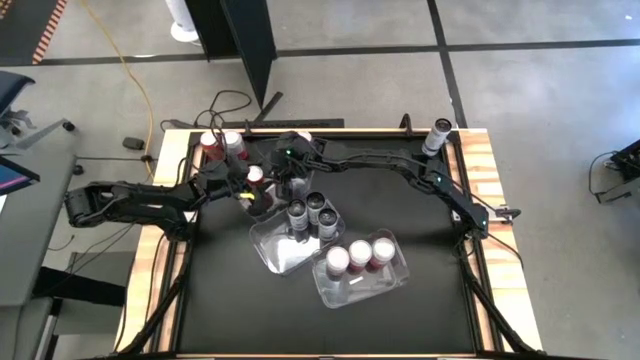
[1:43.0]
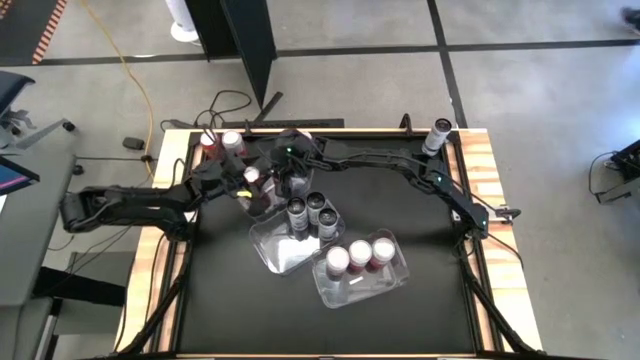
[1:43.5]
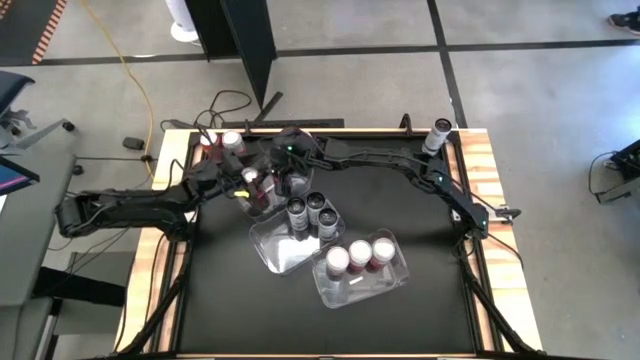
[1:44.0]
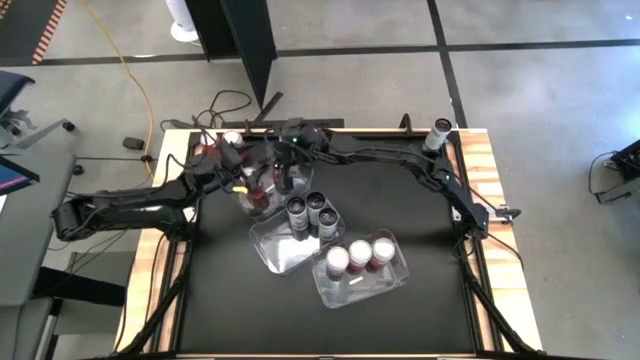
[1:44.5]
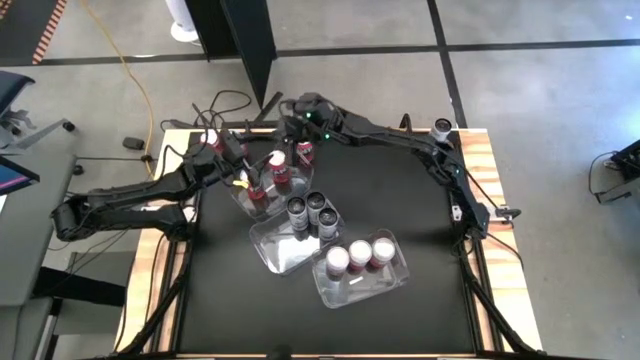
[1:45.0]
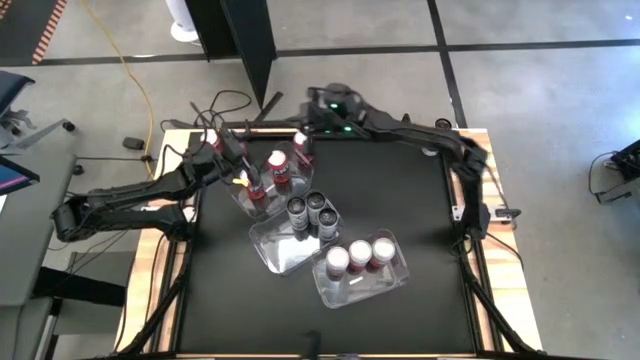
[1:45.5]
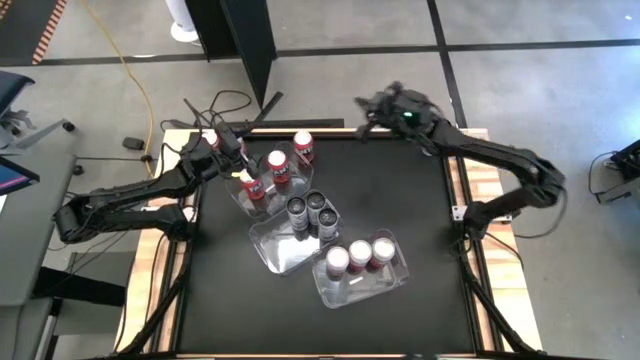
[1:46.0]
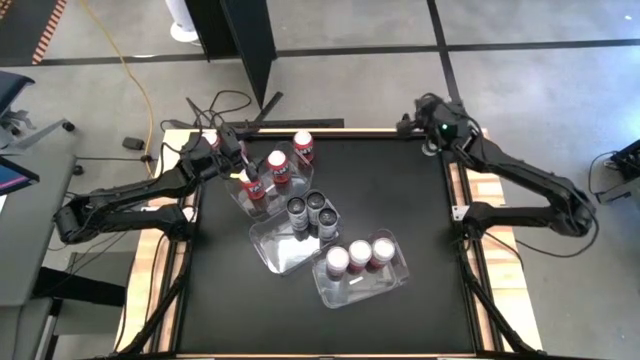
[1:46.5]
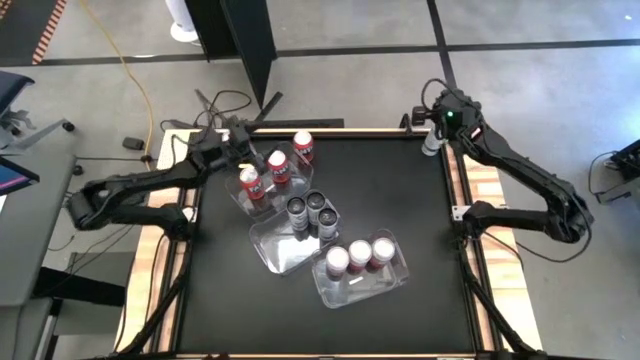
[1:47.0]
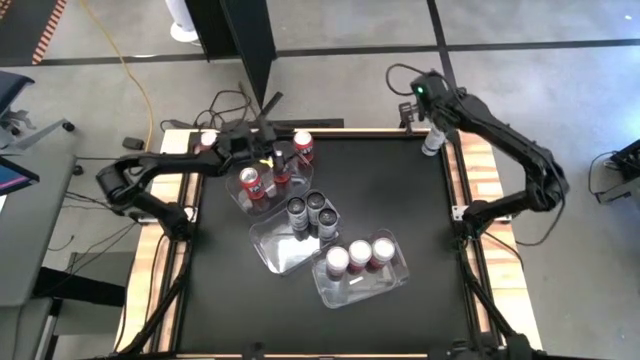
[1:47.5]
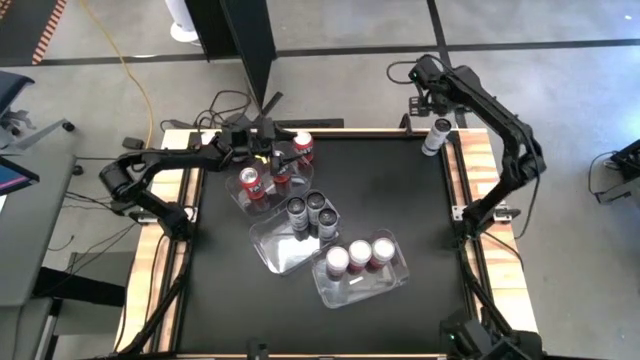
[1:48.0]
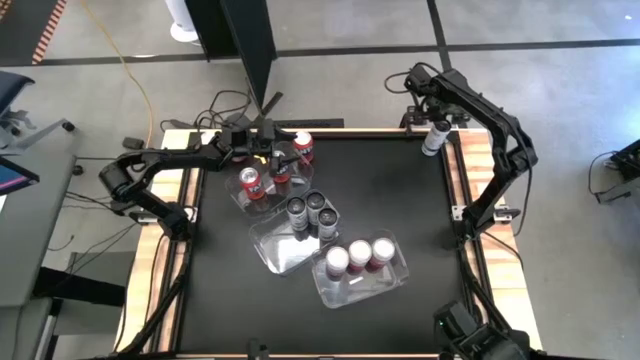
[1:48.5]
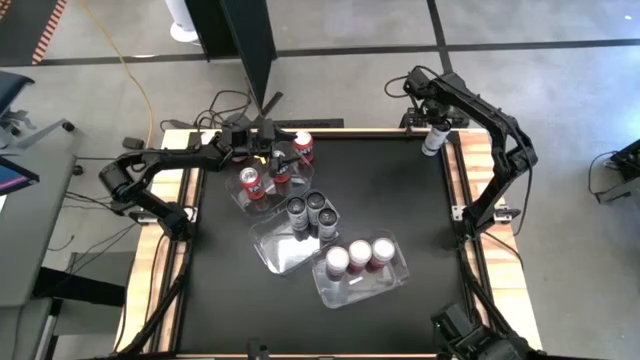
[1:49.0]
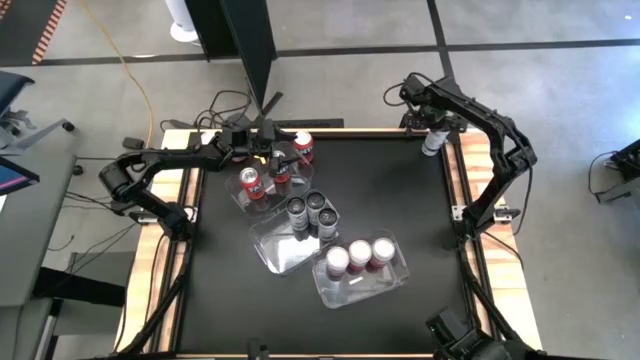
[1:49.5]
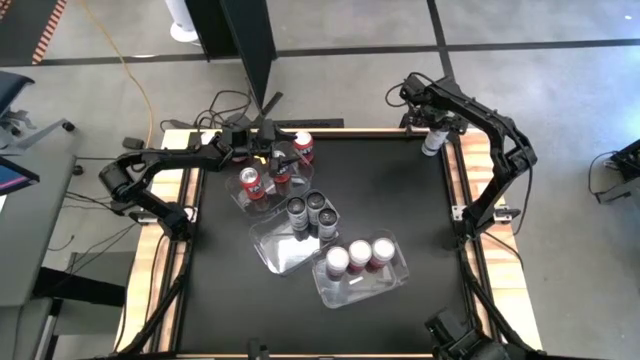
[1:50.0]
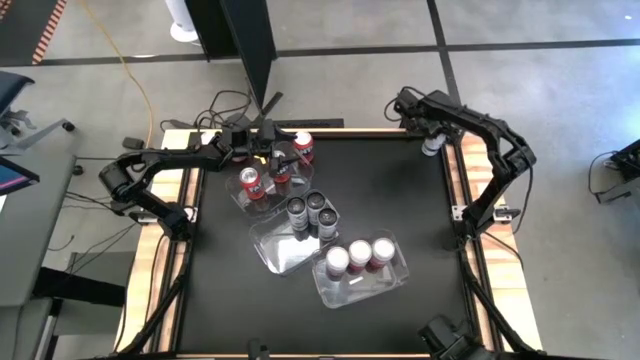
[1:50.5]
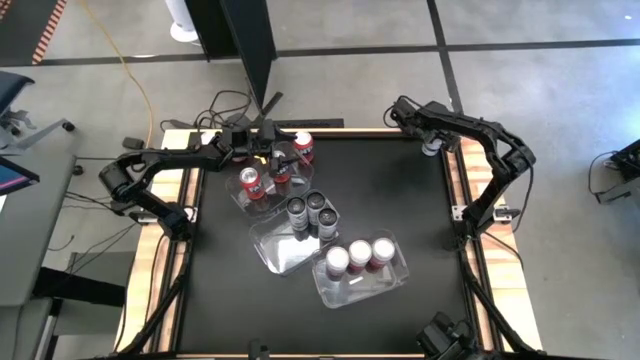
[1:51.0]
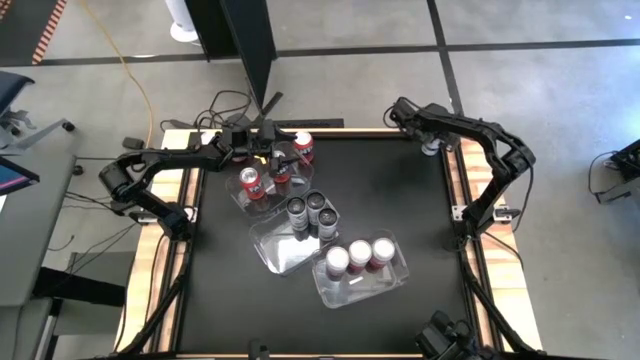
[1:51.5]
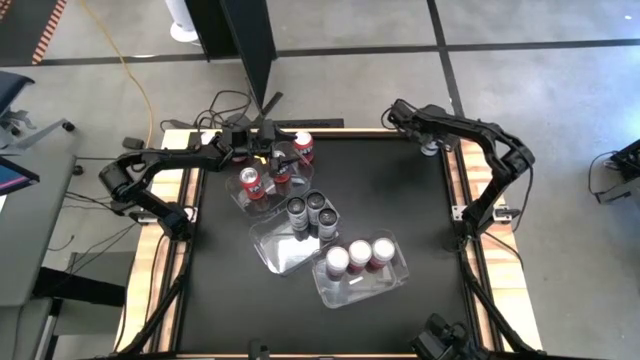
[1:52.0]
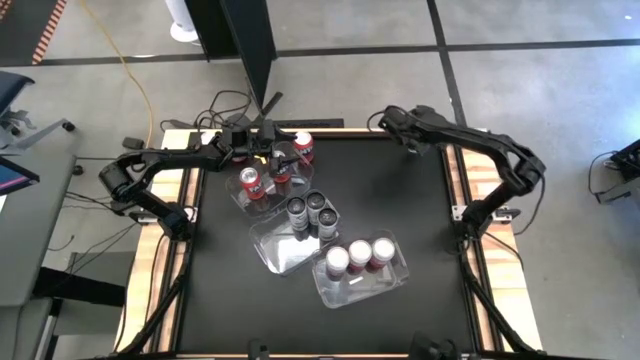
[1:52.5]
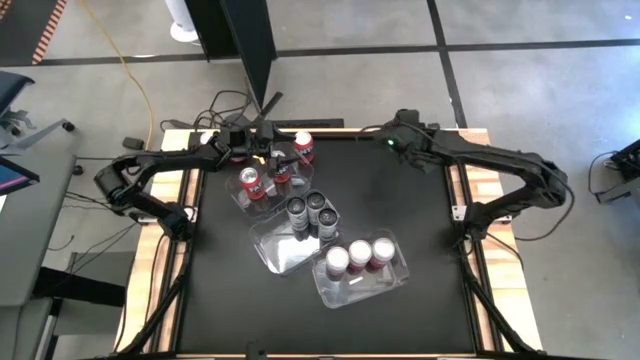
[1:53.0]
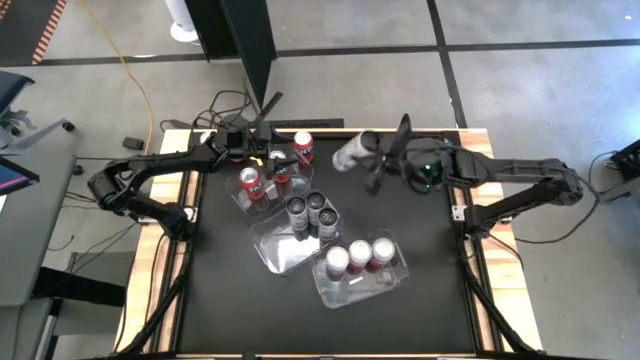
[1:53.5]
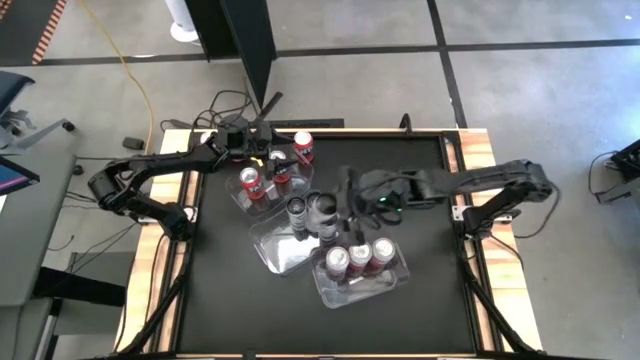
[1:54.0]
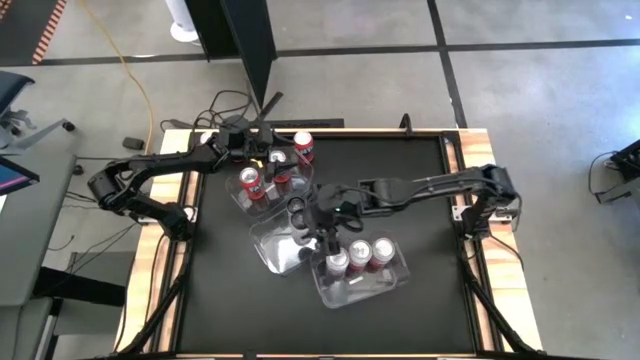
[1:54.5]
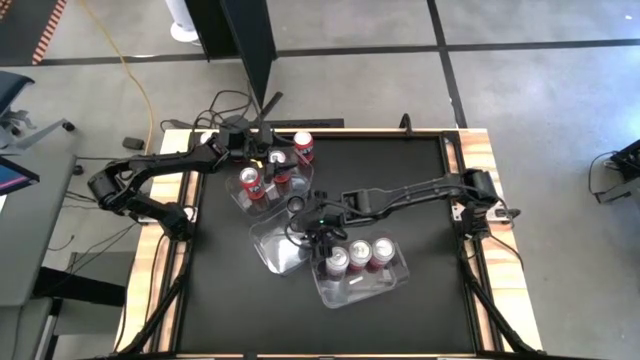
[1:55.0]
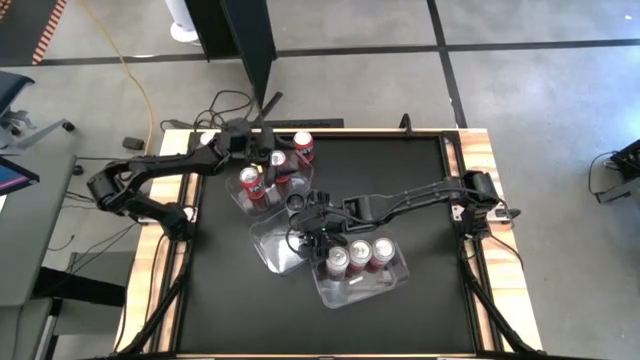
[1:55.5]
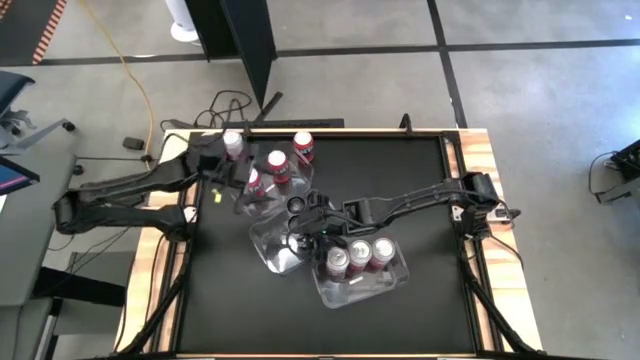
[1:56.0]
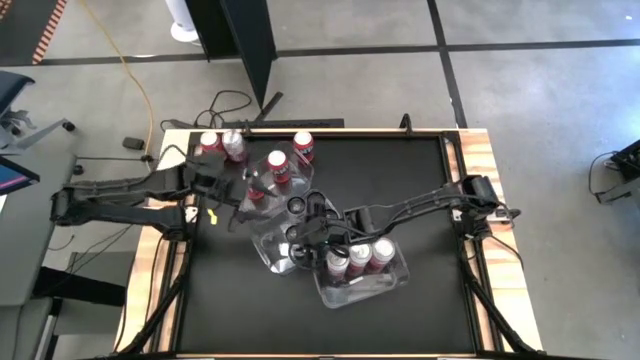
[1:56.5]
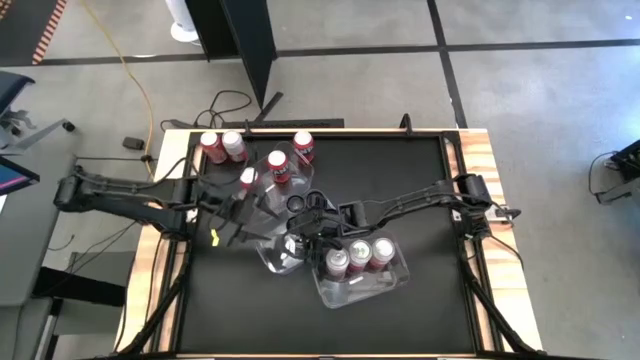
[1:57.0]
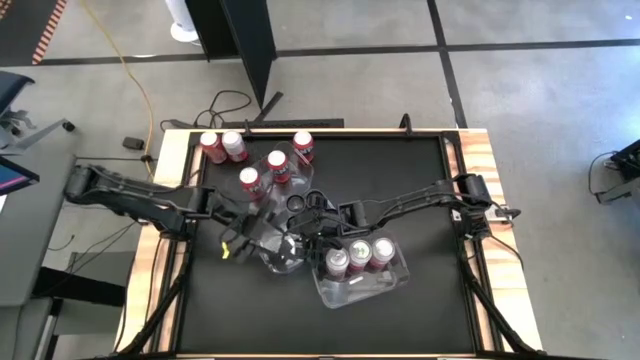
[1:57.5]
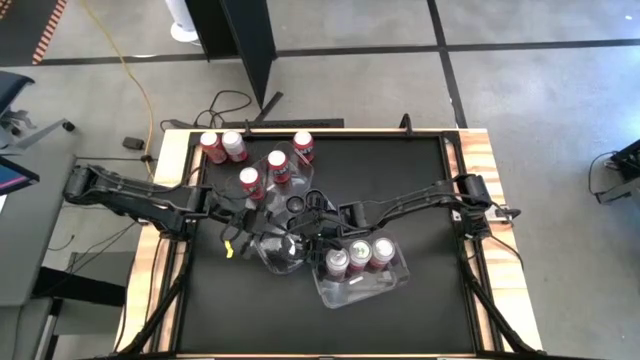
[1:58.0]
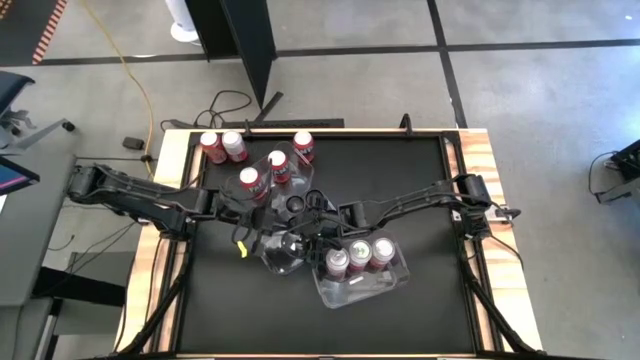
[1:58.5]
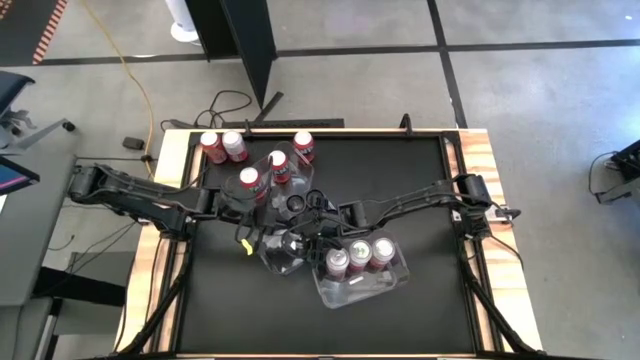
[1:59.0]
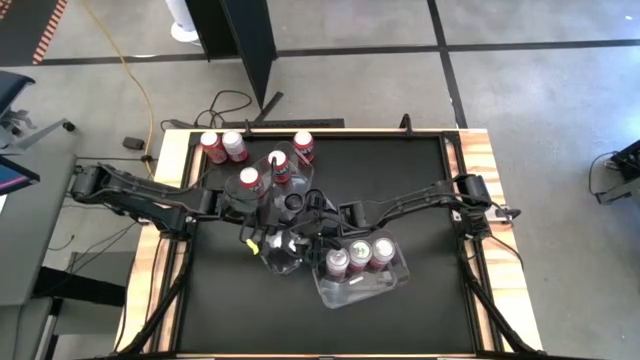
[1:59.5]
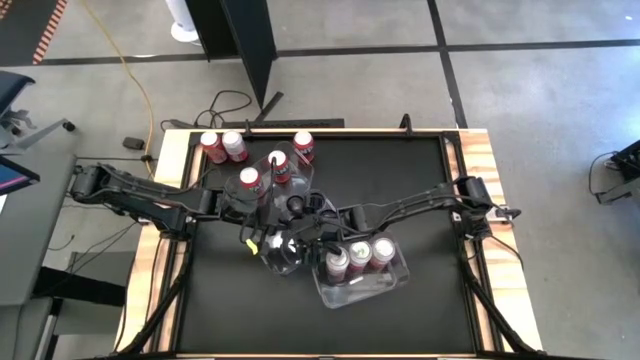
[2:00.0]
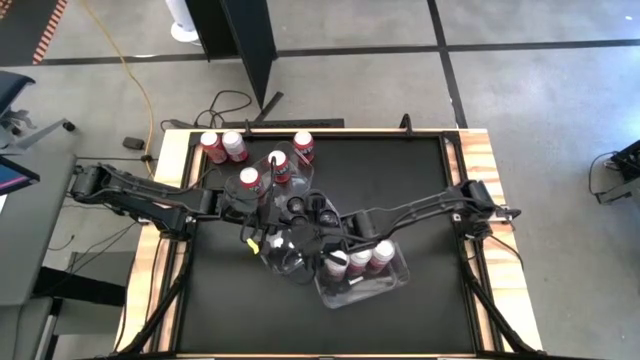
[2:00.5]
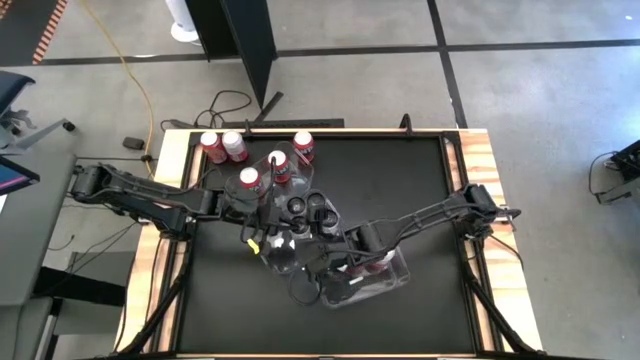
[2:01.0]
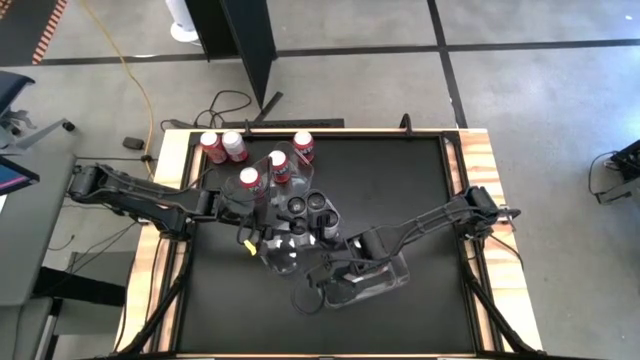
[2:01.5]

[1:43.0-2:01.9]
Task: Sort soda cans
Put the white soda can in the center transparent bin
